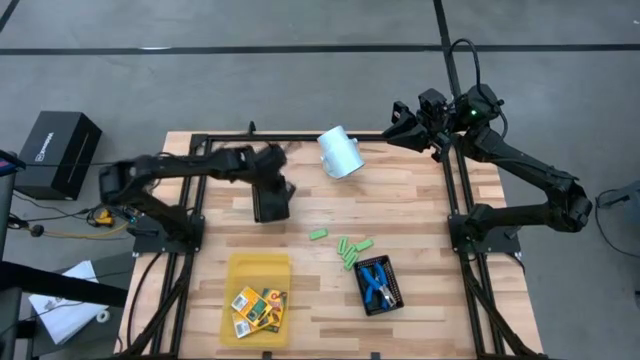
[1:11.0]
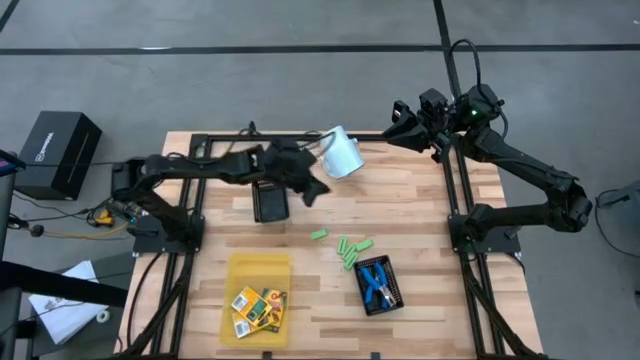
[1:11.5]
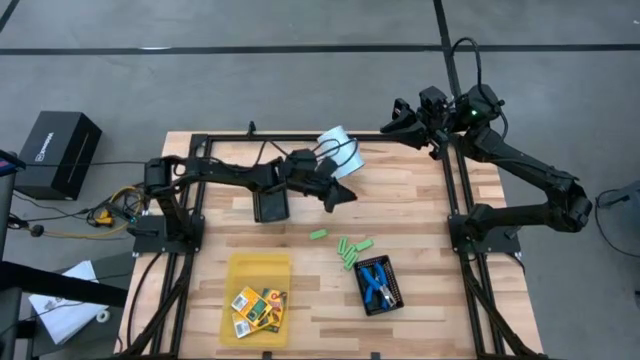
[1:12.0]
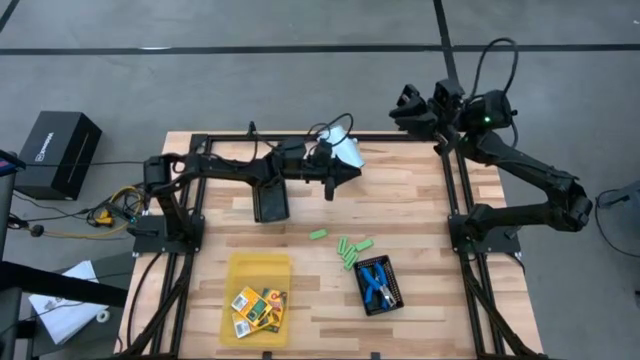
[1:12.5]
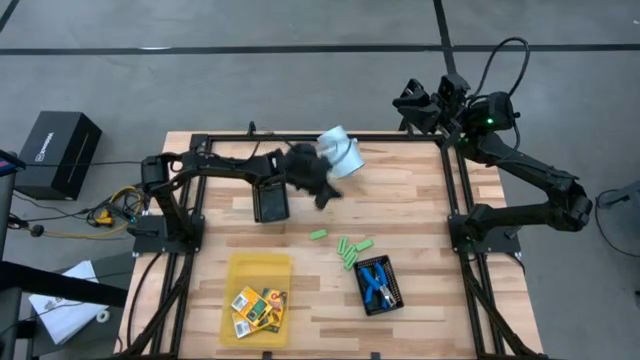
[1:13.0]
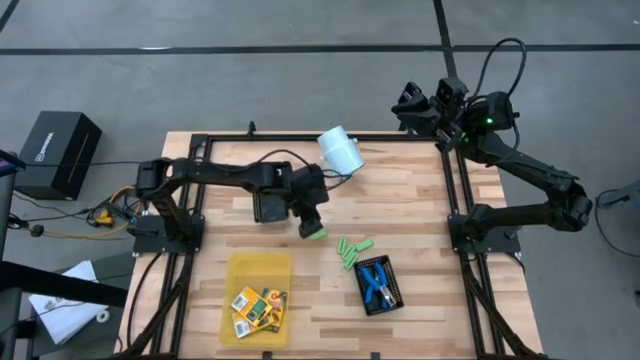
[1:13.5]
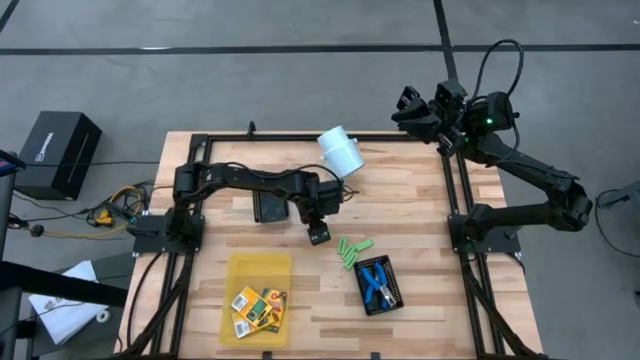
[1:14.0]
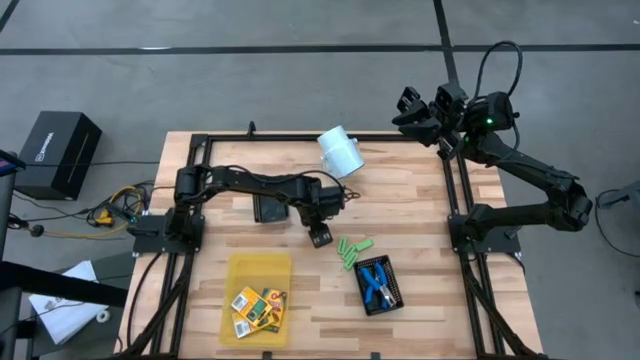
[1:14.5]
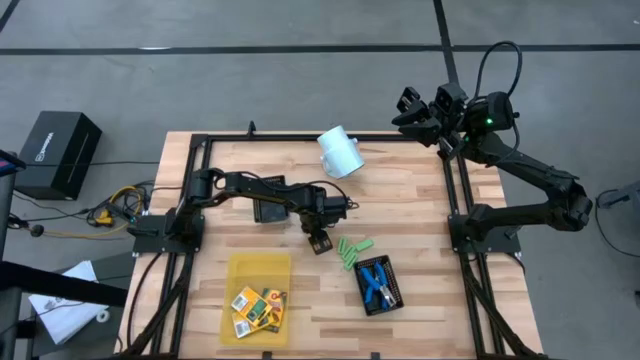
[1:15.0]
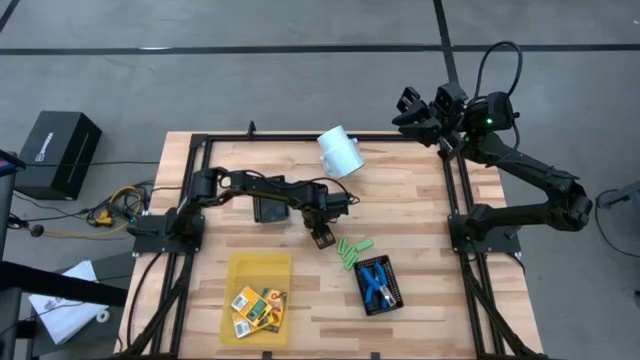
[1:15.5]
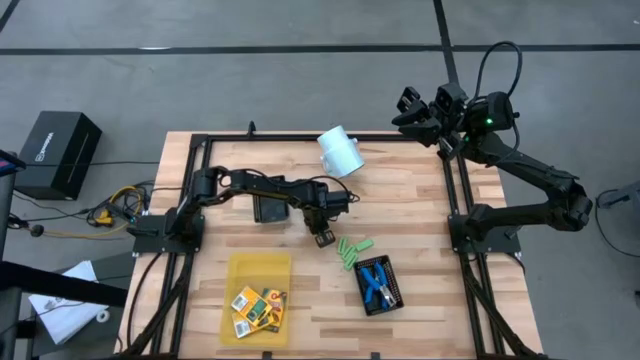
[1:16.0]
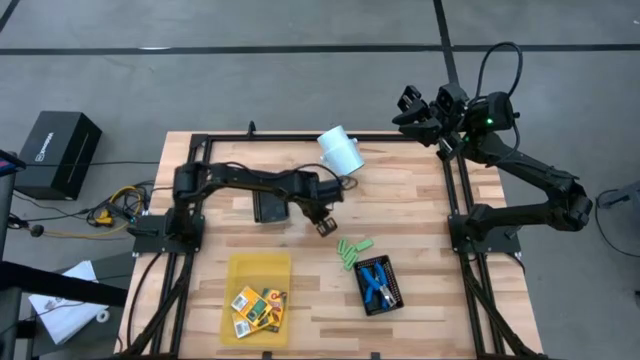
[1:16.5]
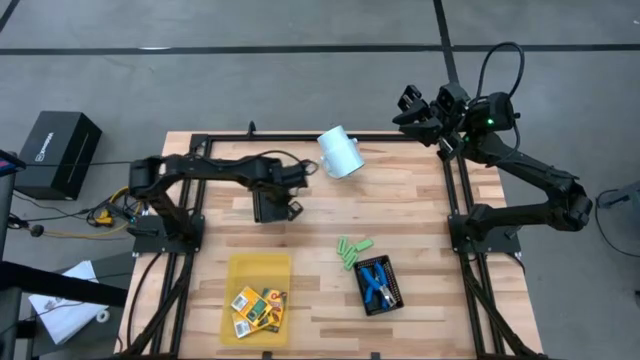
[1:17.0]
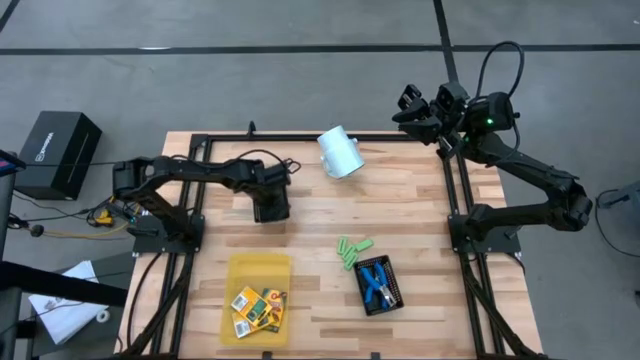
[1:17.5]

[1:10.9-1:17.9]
Task: Pick & Place School Supplies
Put the green eraser into the top black bin

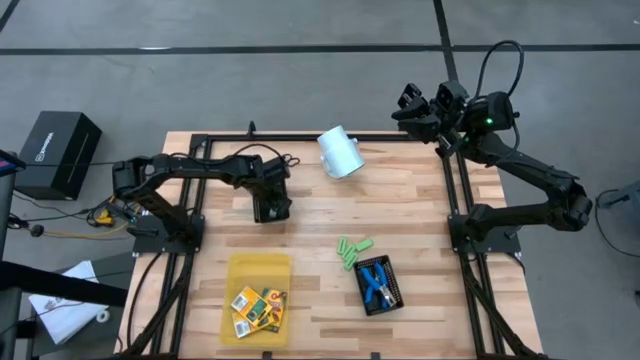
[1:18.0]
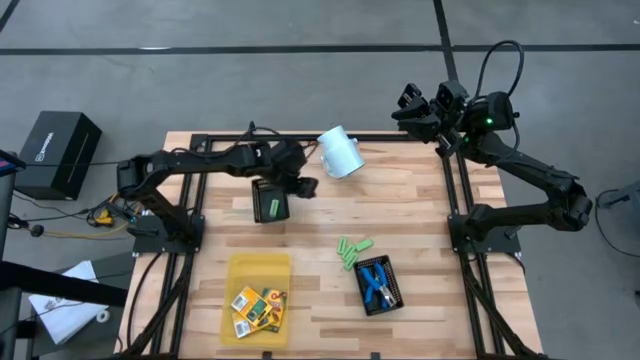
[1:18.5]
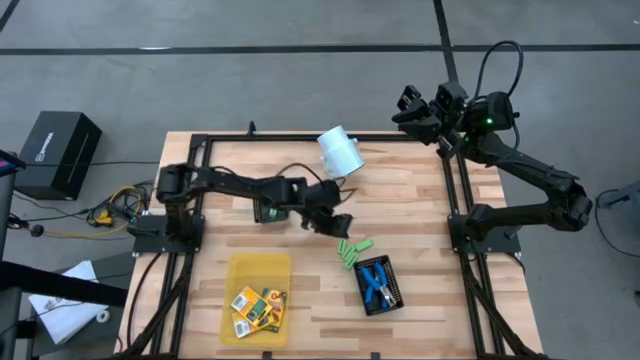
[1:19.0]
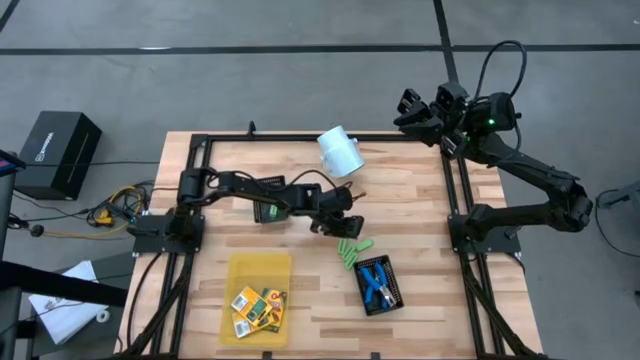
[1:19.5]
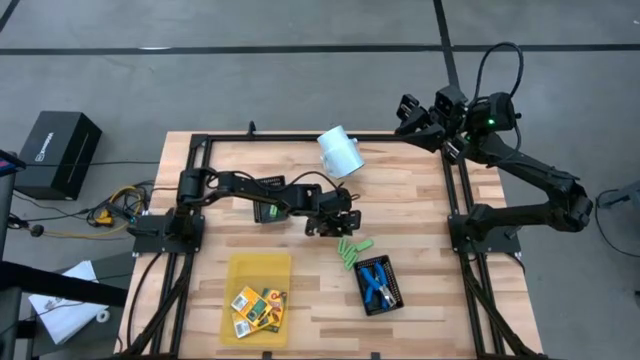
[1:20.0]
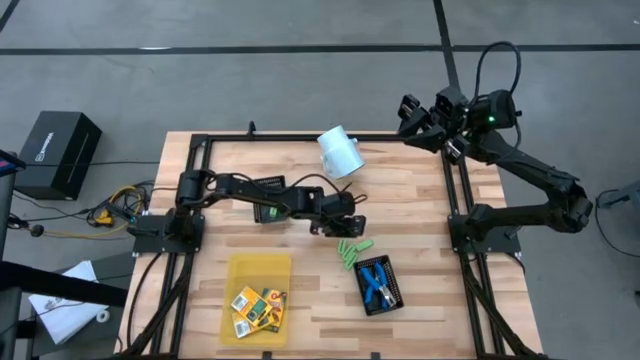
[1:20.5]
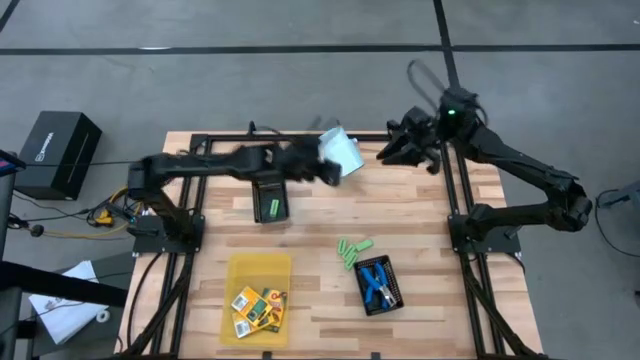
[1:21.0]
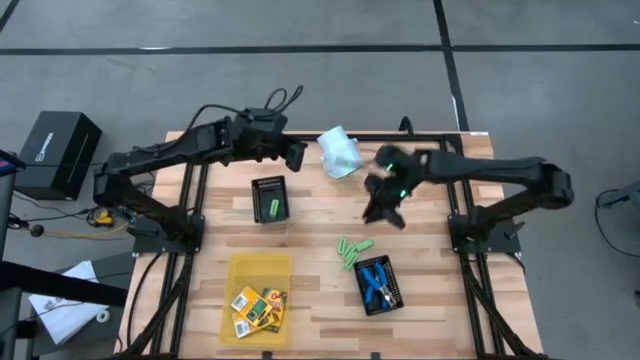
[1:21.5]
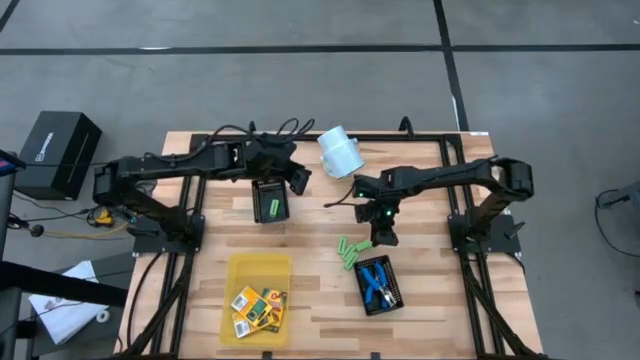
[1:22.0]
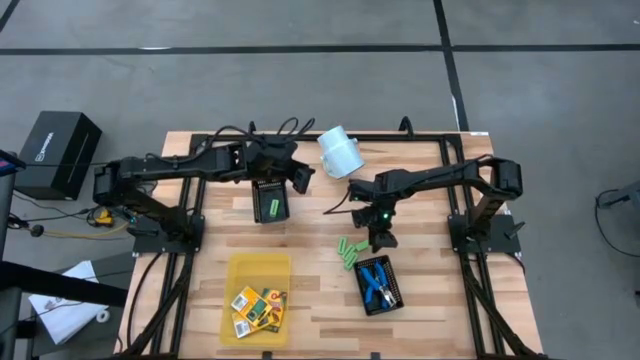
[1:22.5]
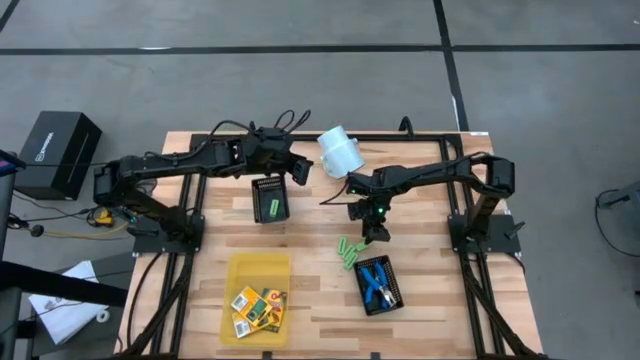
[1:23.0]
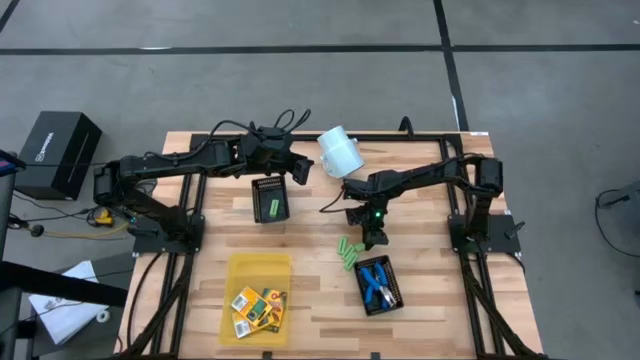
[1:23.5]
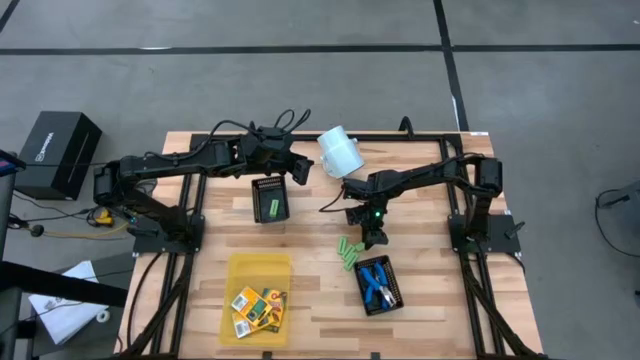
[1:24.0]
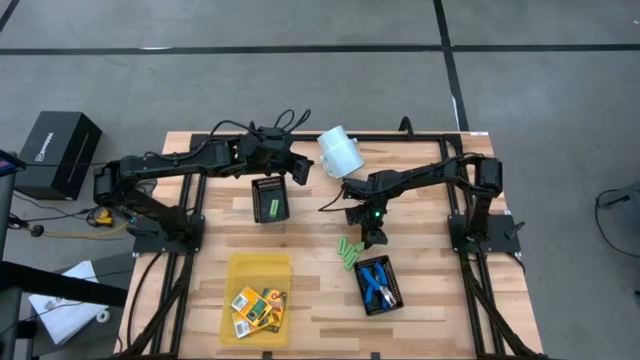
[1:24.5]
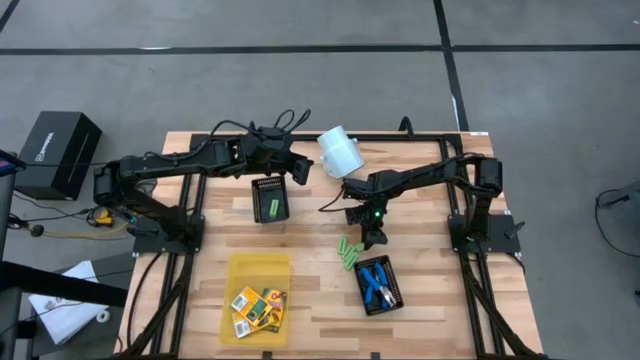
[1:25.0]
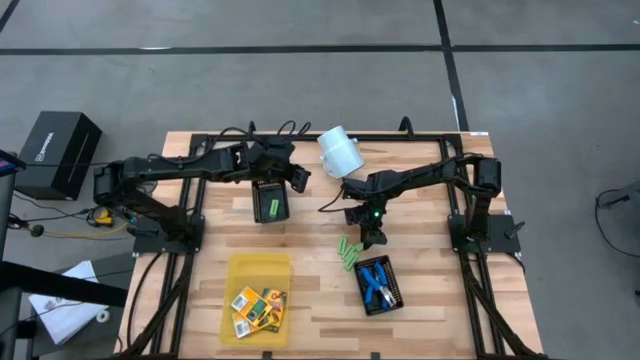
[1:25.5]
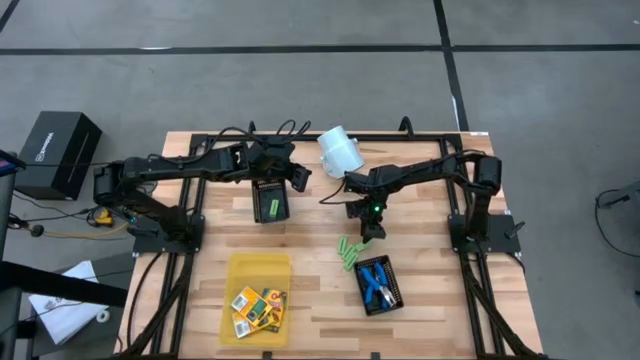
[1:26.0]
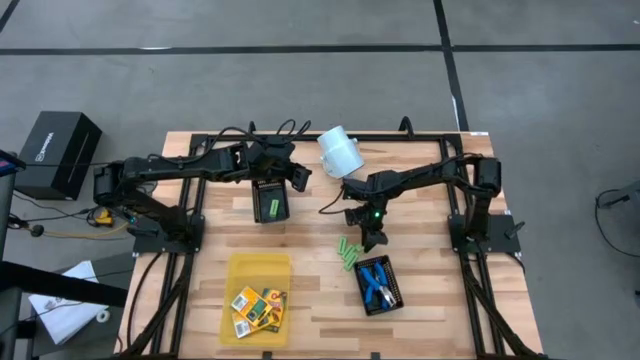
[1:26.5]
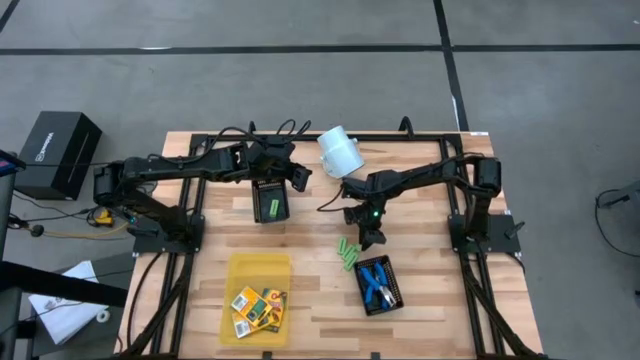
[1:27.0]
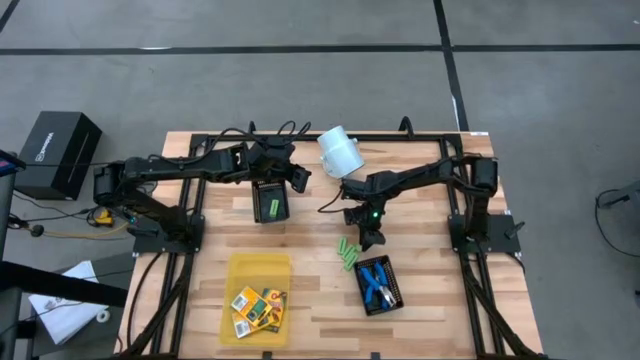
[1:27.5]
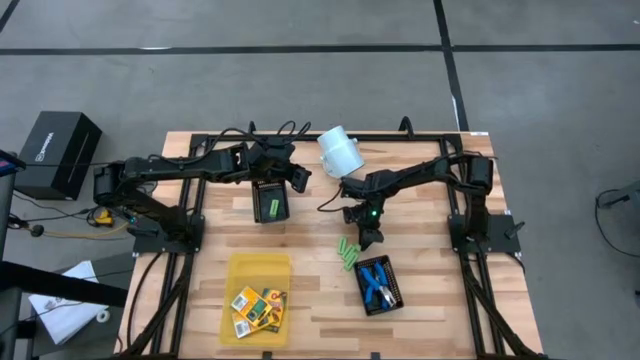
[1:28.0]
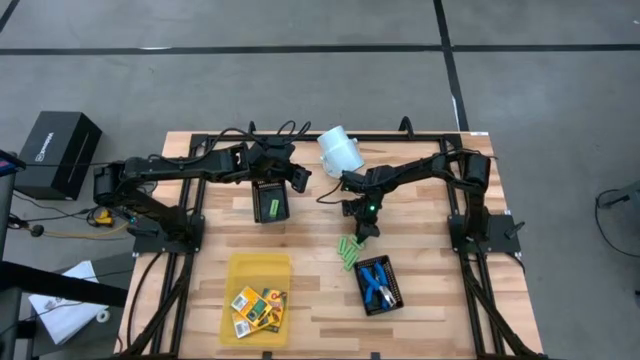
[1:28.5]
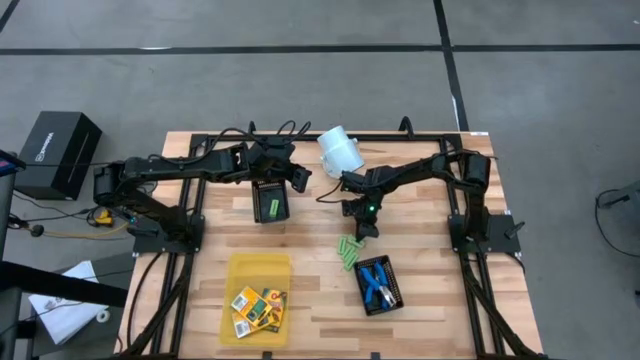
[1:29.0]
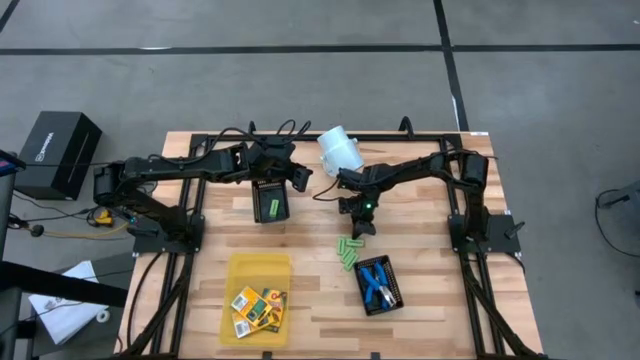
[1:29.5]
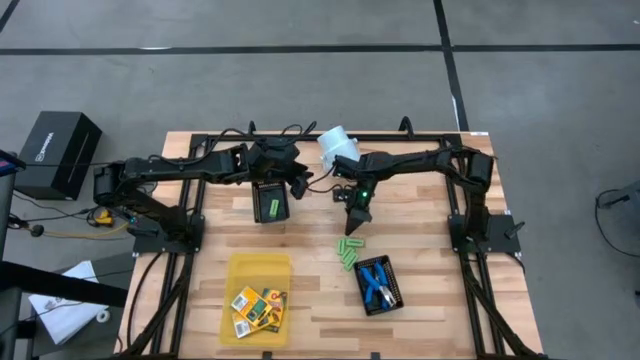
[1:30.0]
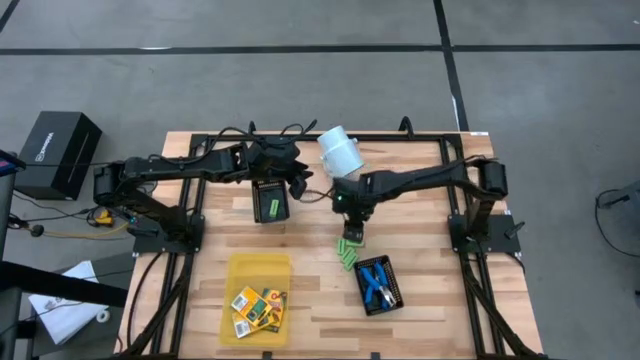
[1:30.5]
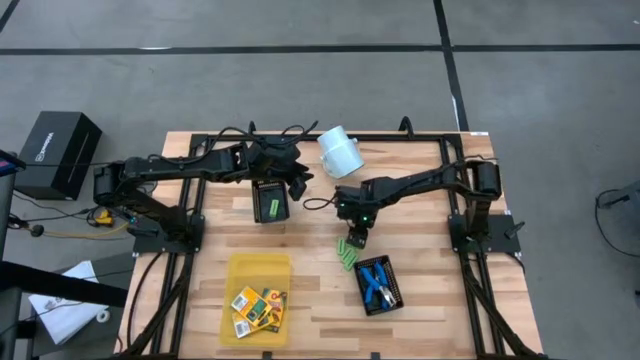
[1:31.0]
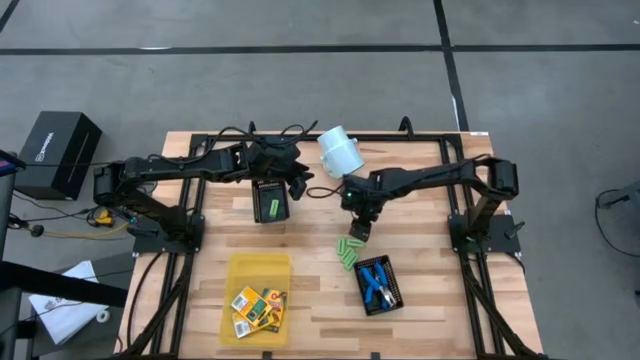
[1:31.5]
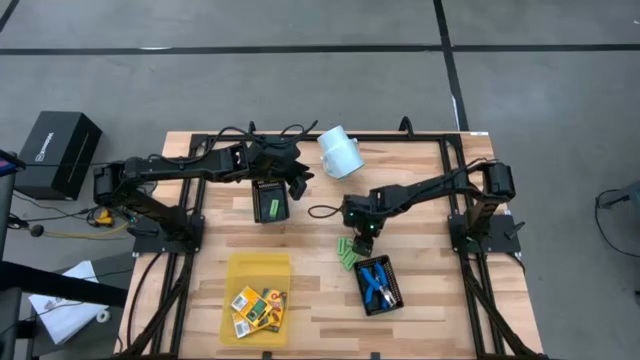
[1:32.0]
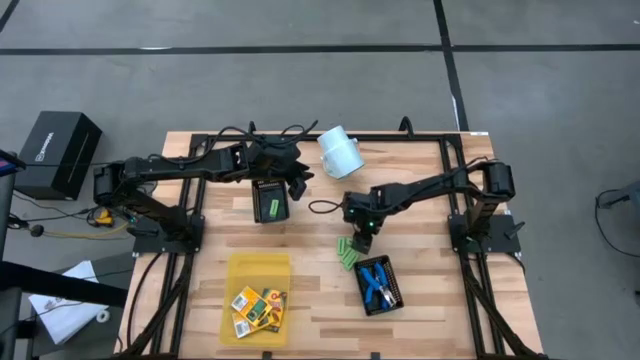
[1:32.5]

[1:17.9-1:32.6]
Put the green eraser into the top black bin
